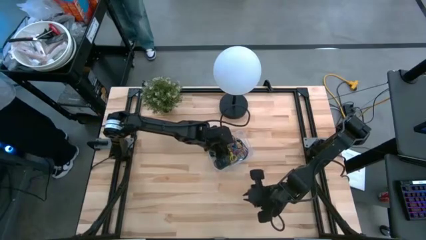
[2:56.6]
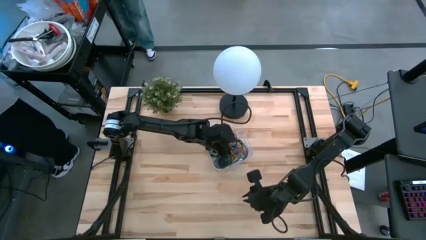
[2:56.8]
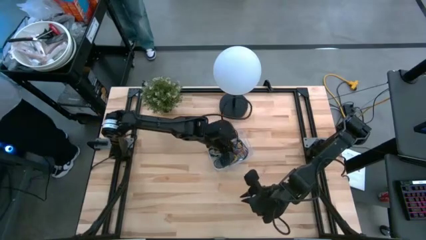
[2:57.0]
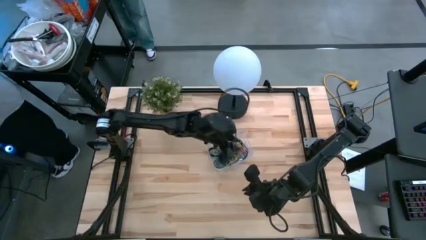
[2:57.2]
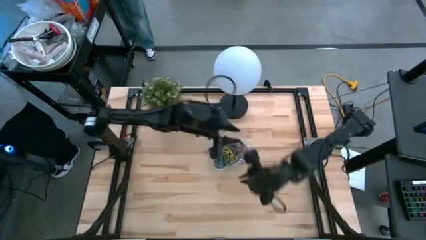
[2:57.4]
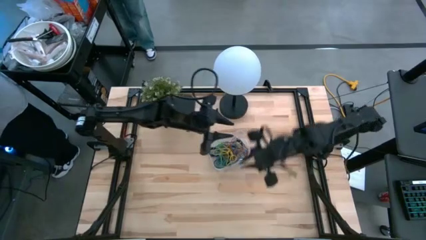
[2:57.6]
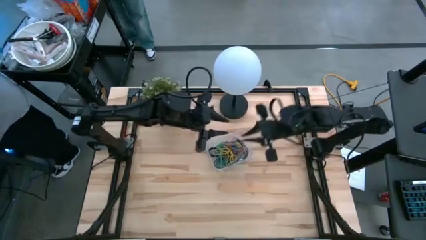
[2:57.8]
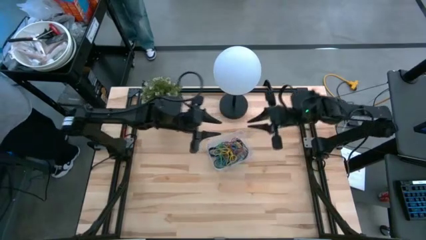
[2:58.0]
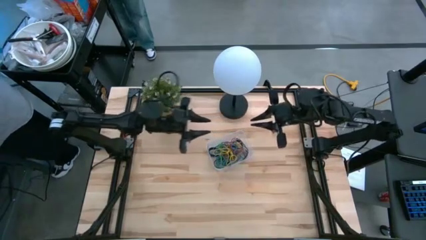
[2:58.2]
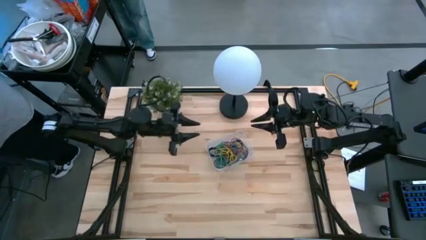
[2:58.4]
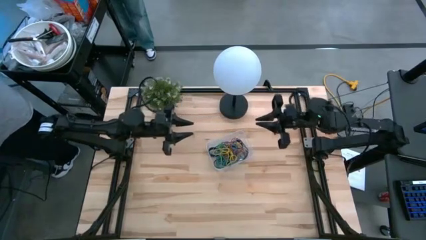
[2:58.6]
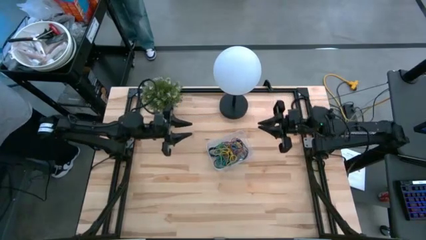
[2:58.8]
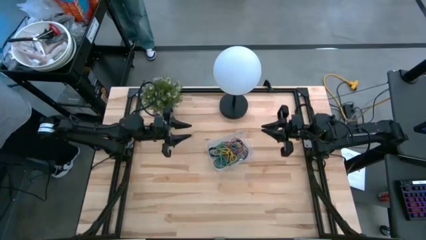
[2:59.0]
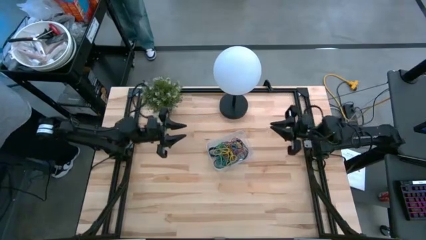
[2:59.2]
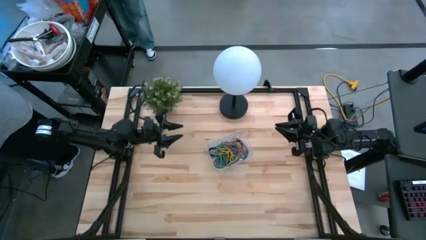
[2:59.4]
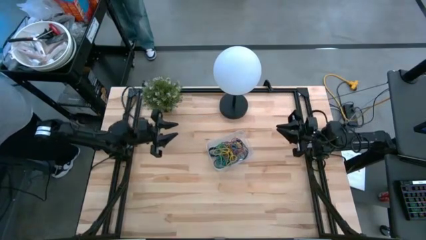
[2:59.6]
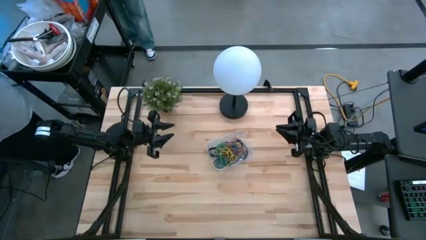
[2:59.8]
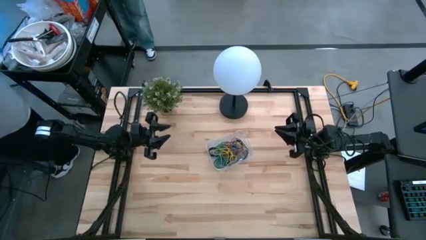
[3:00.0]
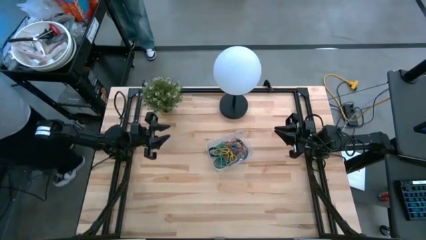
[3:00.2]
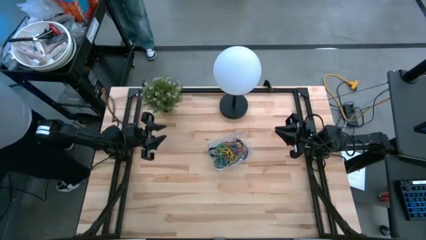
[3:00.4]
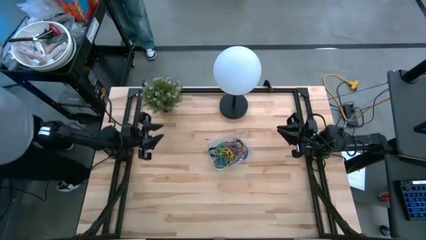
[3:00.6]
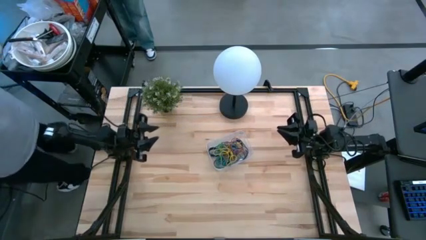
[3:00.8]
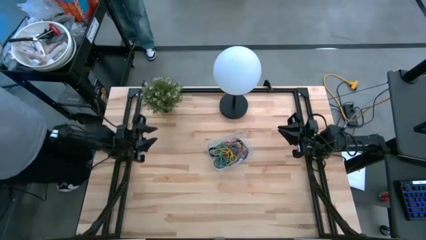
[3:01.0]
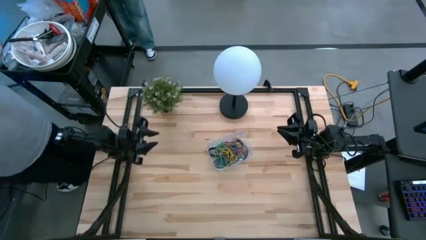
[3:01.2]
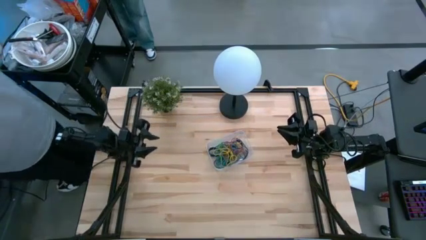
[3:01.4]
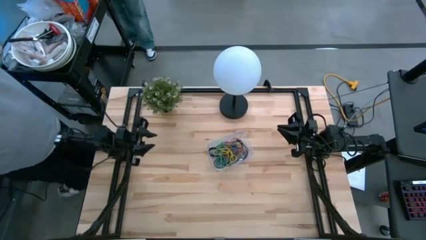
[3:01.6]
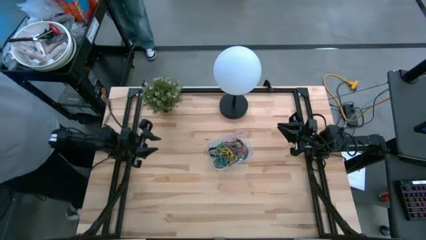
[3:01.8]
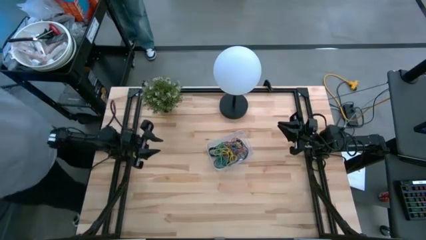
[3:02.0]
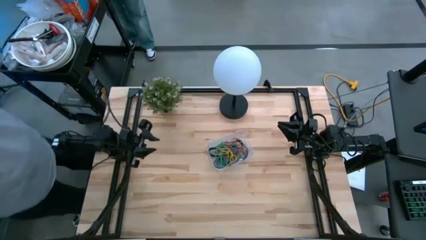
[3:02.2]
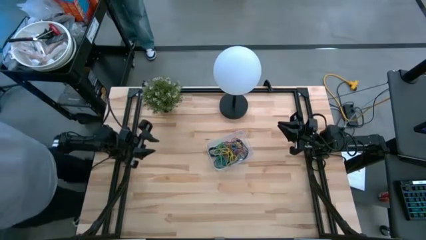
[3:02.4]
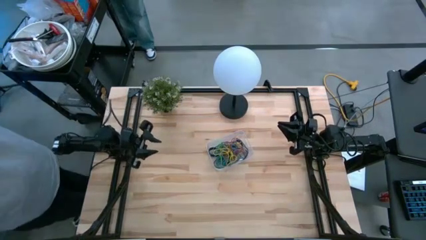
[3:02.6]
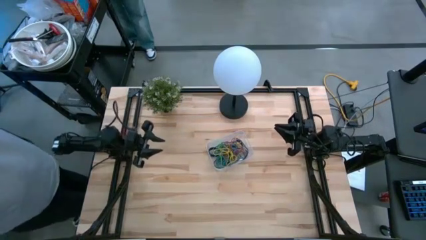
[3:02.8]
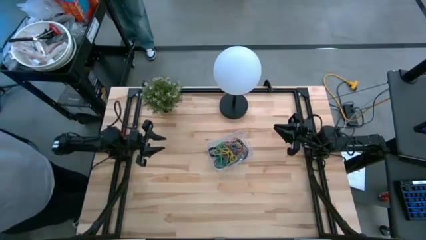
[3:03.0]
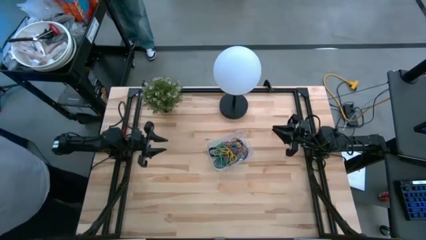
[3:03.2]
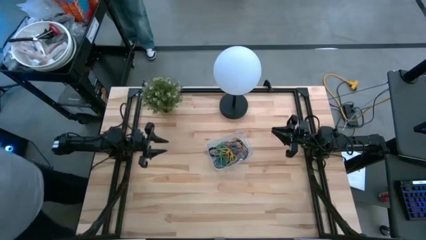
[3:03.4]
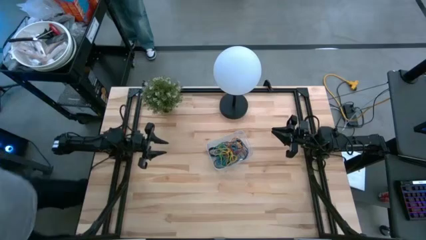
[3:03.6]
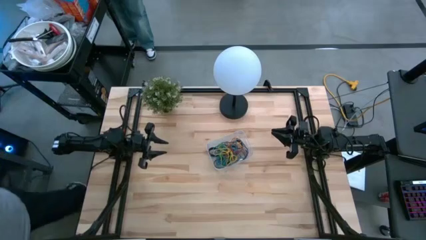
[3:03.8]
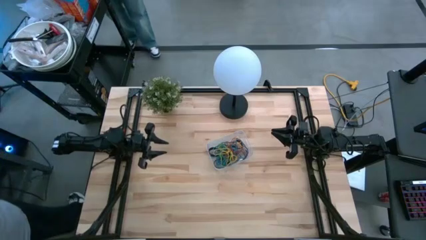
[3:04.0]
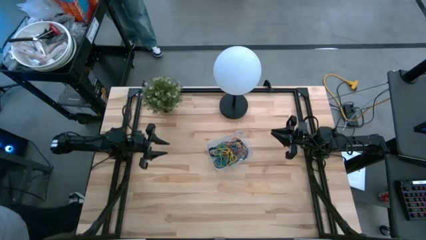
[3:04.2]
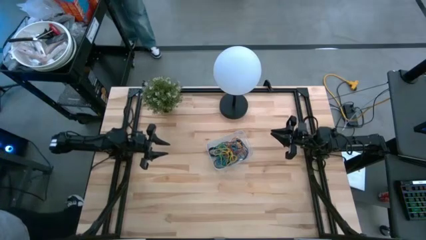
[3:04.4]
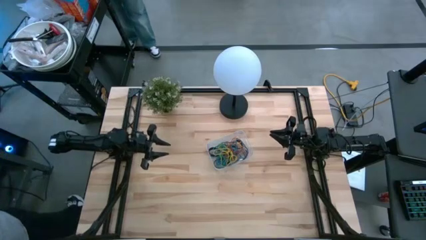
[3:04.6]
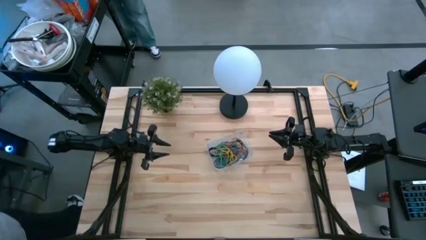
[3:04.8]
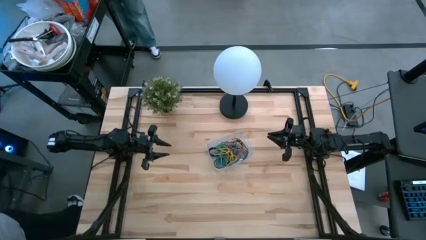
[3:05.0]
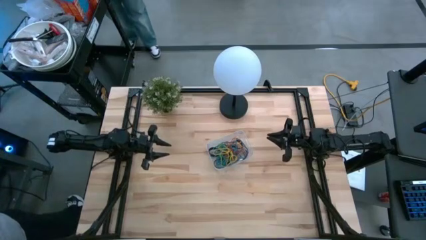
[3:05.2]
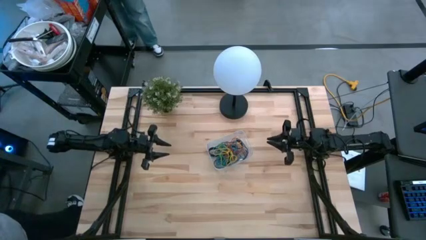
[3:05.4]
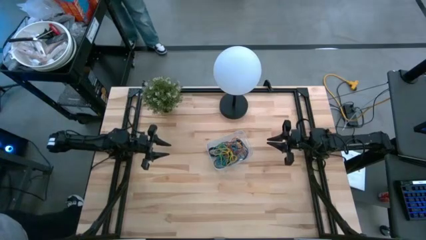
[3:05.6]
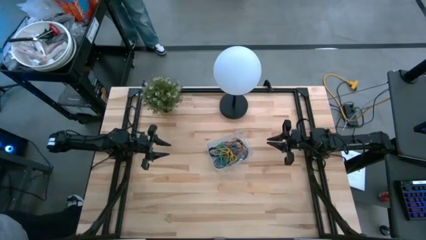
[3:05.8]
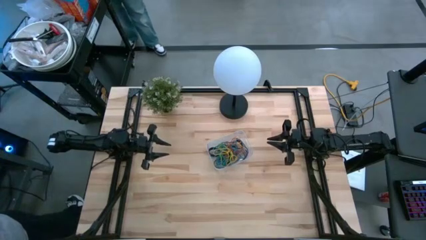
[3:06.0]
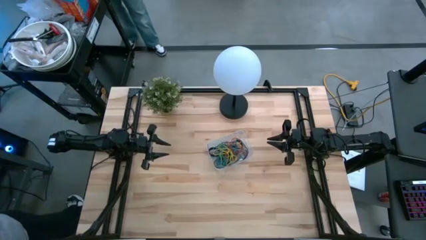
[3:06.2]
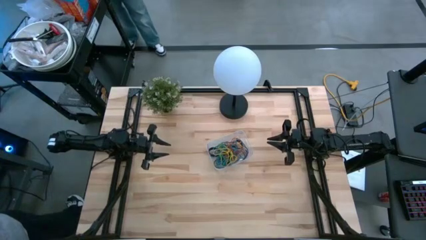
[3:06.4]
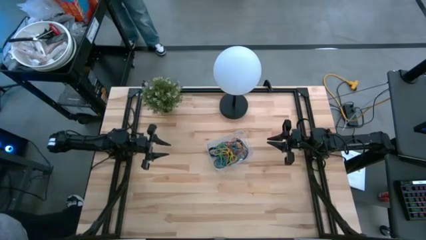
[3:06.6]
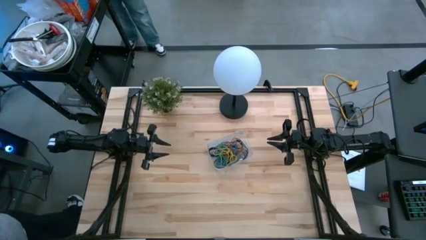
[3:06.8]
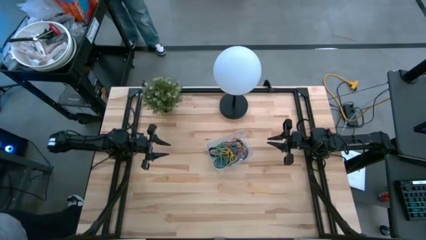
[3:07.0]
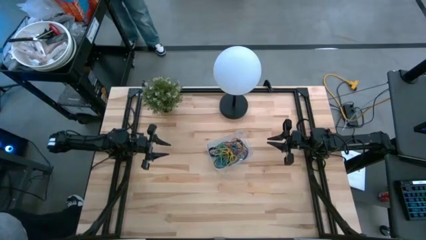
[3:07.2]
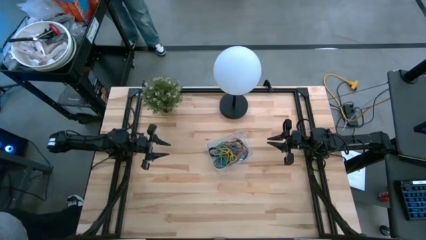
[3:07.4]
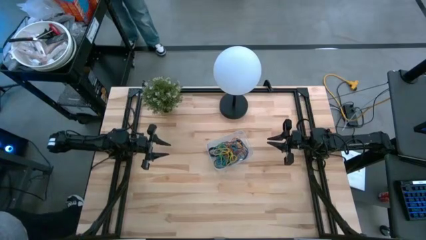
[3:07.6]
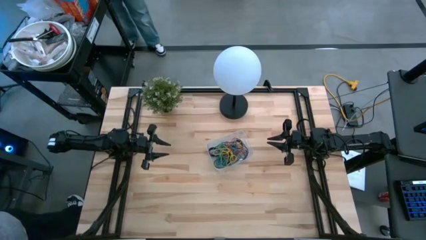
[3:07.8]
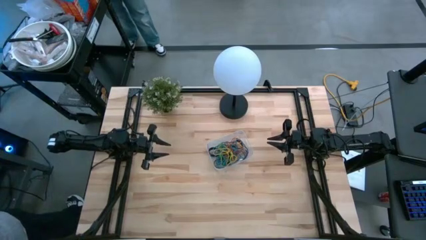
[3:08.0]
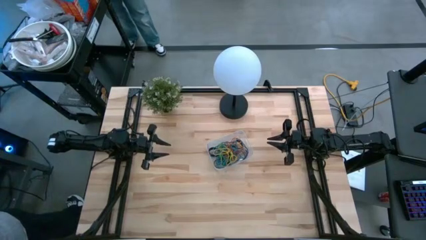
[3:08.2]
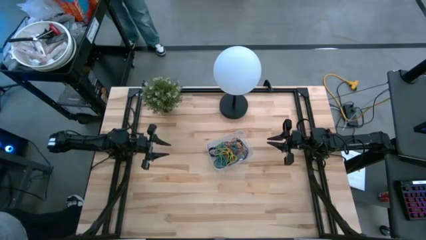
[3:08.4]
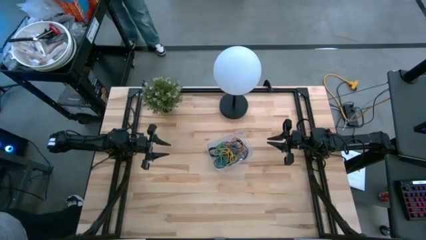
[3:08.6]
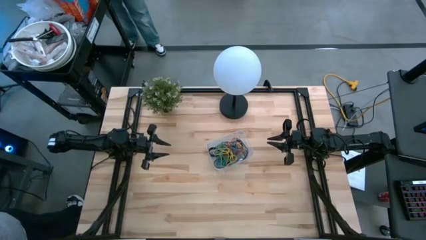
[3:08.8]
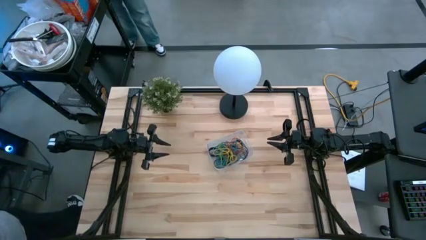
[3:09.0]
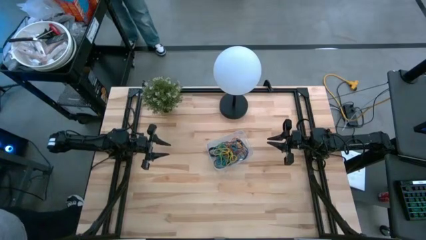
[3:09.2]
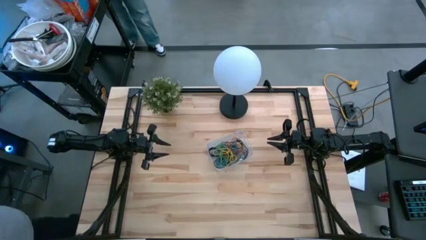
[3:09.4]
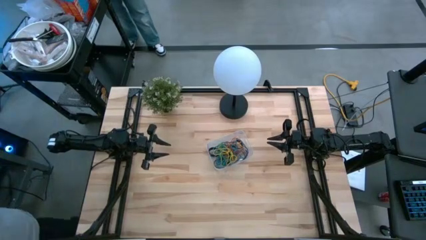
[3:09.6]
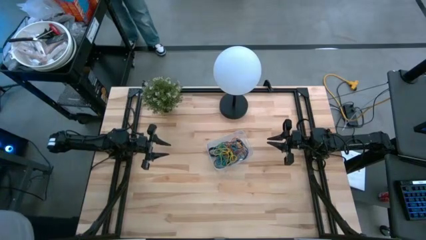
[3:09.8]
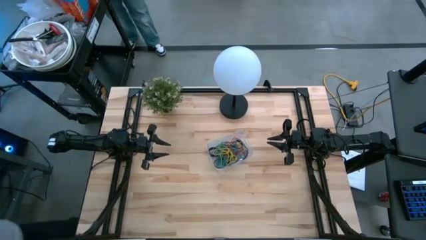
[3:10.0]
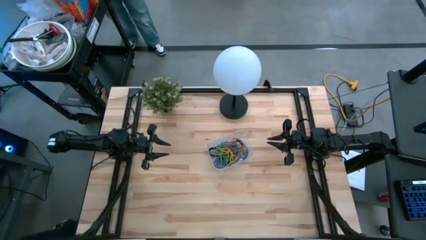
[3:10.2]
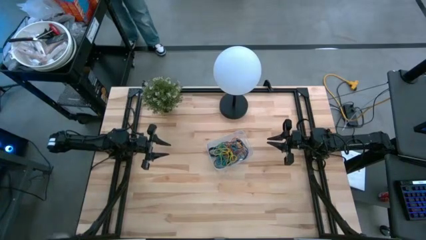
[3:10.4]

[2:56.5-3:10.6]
Task: Pick and place rubber bands into bin
Return to Home Position

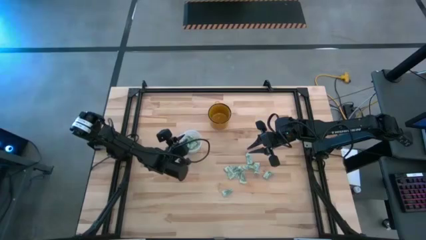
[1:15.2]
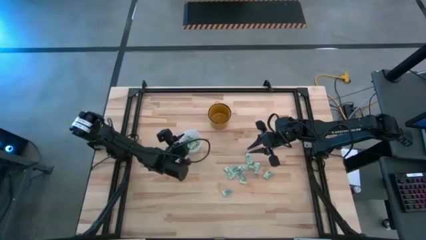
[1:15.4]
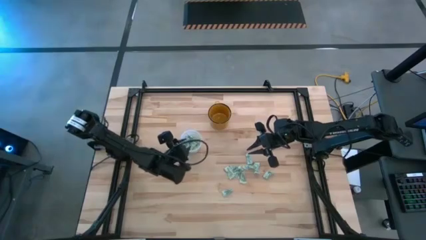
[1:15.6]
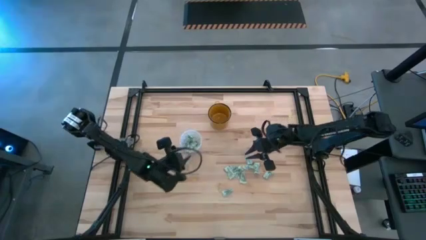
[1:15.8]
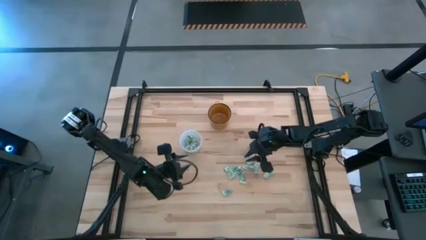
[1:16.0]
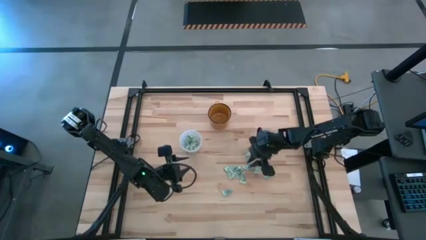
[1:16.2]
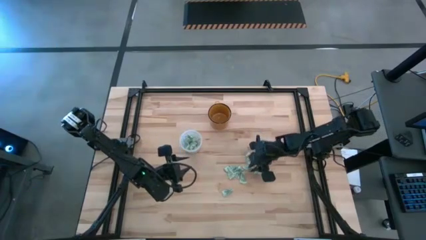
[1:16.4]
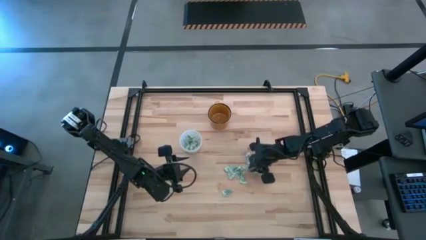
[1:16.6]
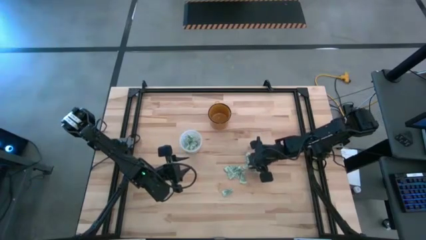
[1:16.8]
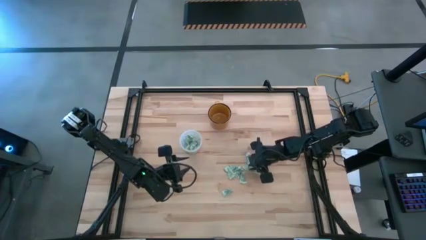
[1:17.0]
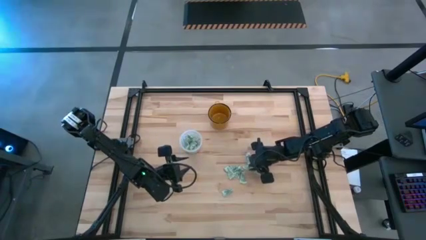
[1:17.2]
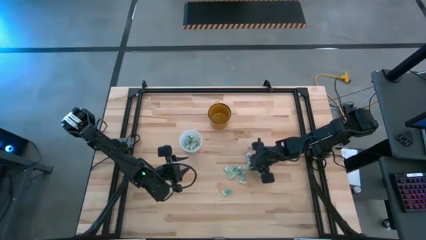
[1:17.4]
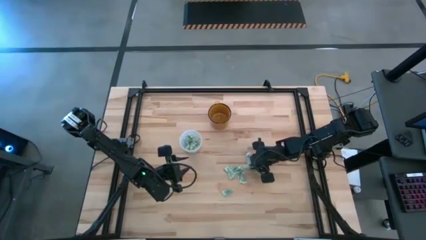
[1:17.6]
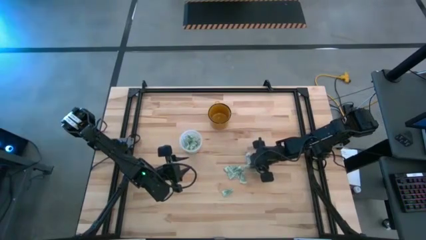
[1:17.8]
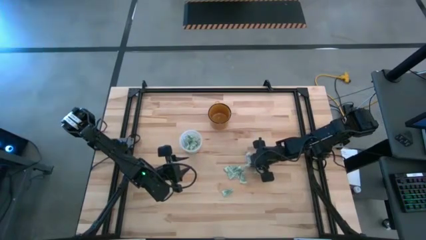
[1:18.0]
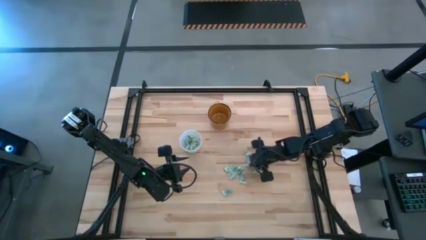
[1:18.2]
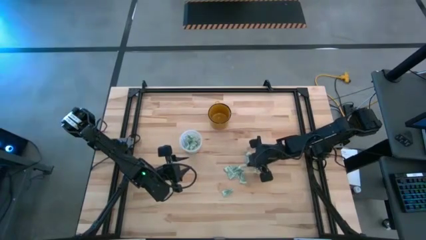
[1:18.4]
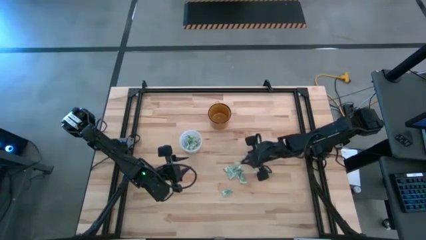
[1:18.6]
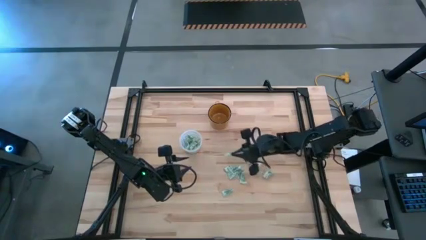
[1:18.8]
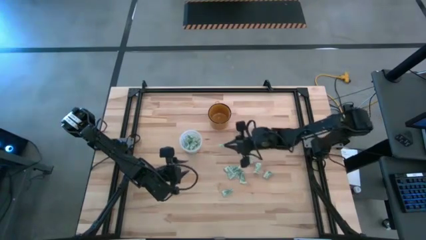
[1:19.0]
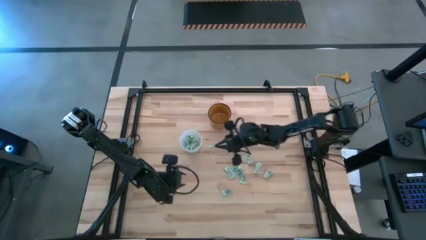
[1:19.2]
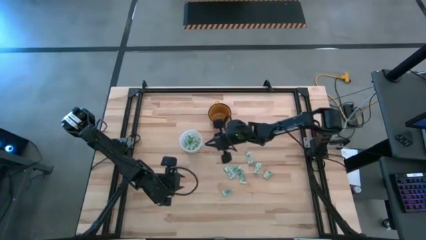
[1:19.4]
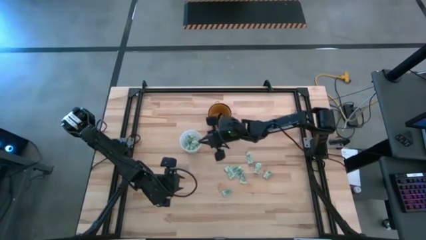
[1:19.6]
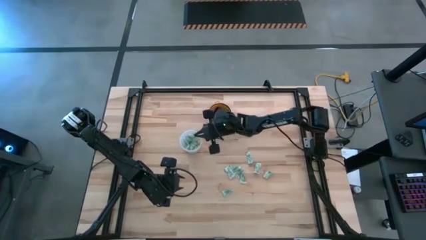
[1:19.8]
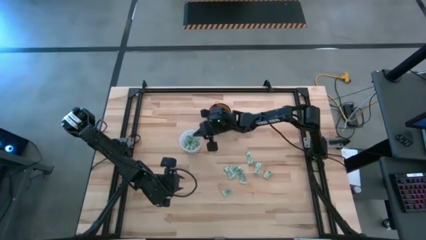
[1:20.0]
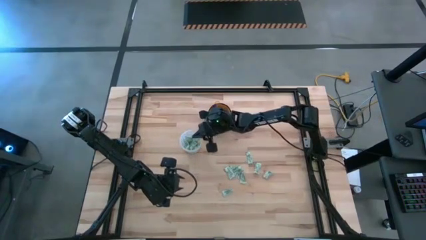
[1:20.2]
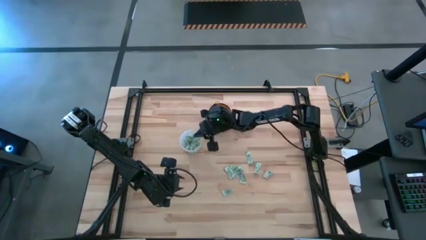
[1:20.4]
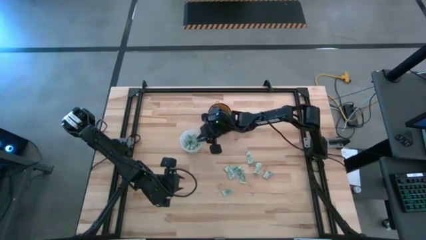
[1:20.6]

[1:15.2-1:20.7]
Task: Pick and place Stevia / Truvia into bins
Put the stevia packet into the transparent bin
